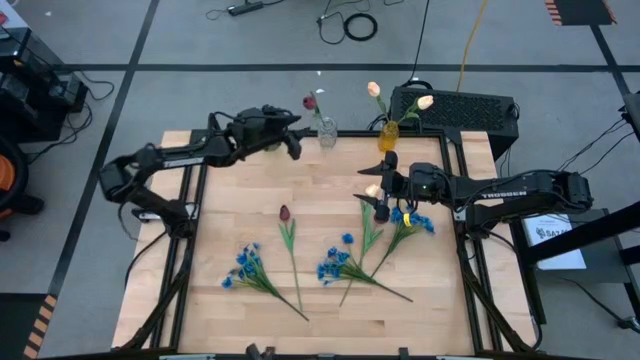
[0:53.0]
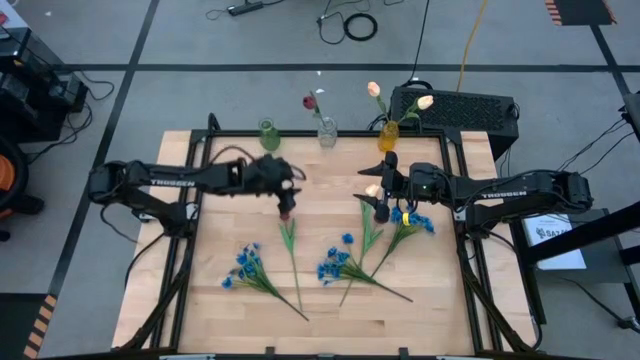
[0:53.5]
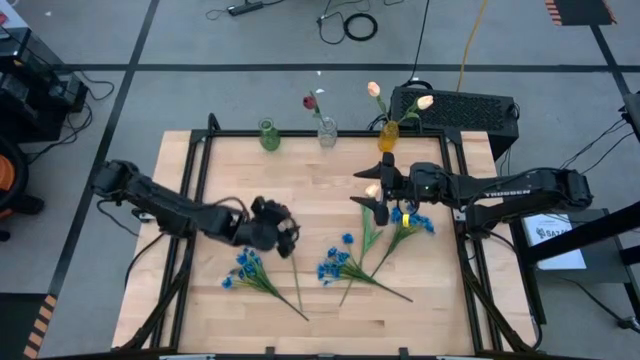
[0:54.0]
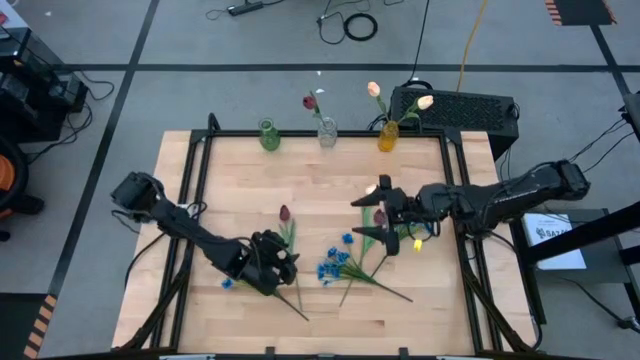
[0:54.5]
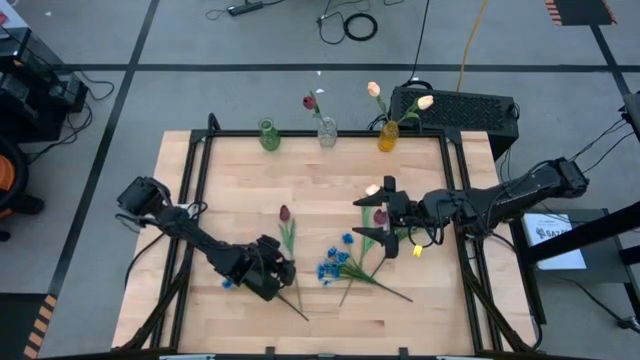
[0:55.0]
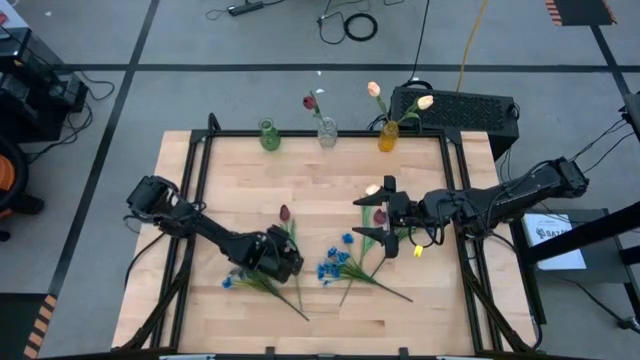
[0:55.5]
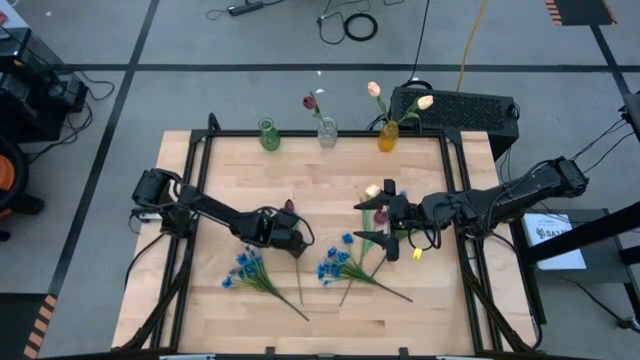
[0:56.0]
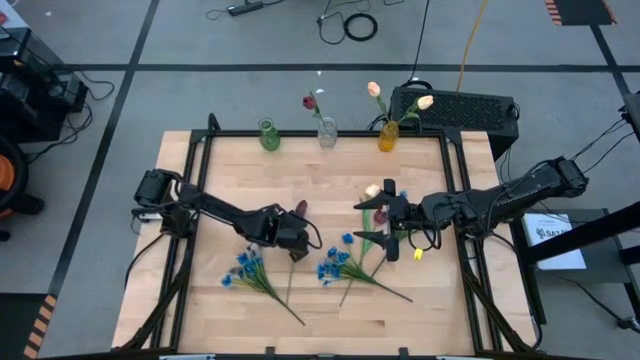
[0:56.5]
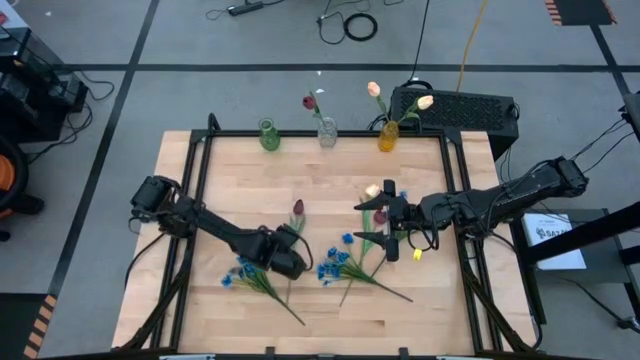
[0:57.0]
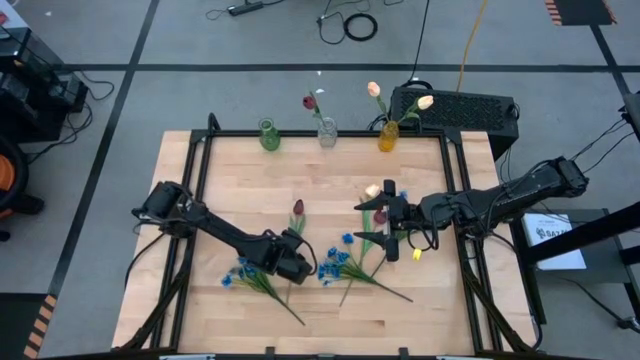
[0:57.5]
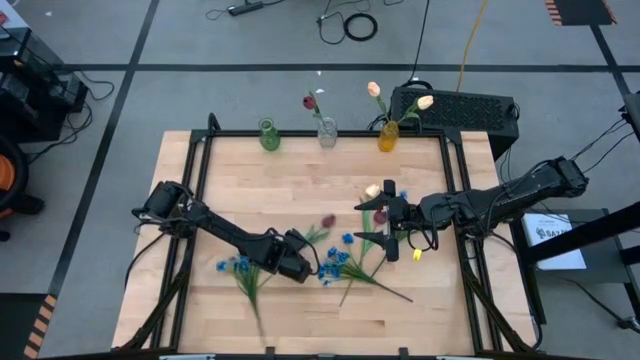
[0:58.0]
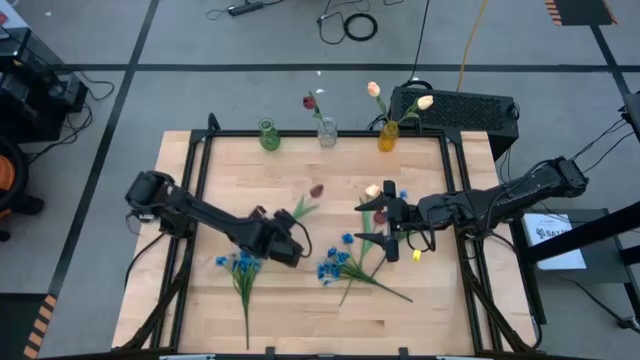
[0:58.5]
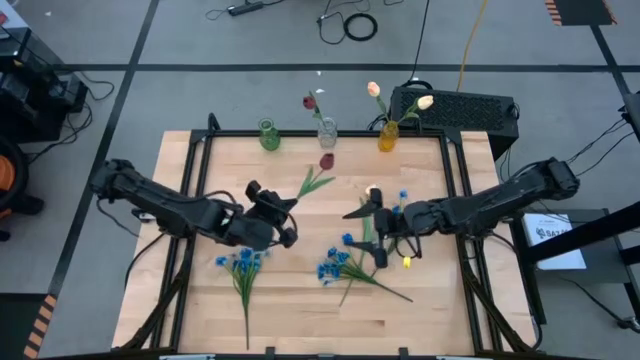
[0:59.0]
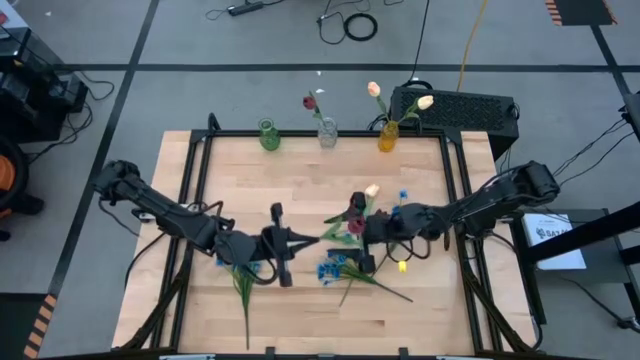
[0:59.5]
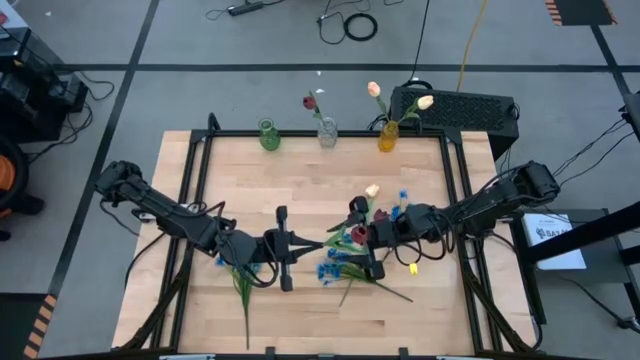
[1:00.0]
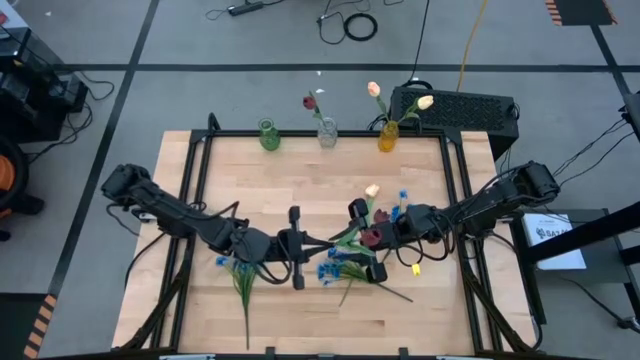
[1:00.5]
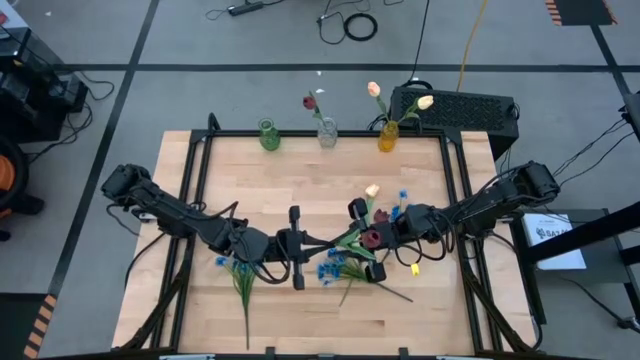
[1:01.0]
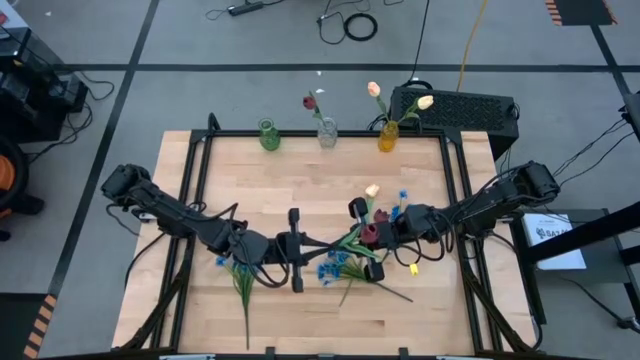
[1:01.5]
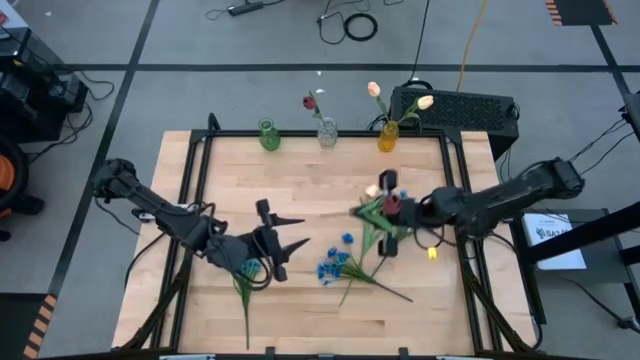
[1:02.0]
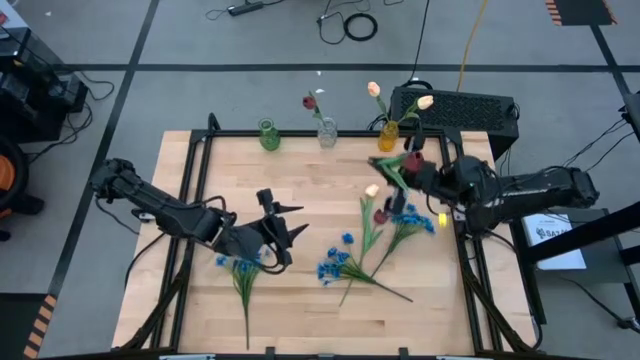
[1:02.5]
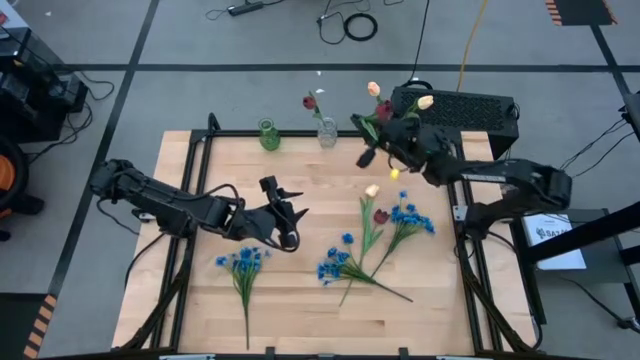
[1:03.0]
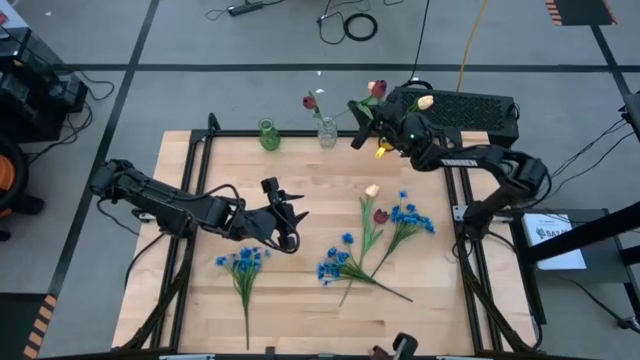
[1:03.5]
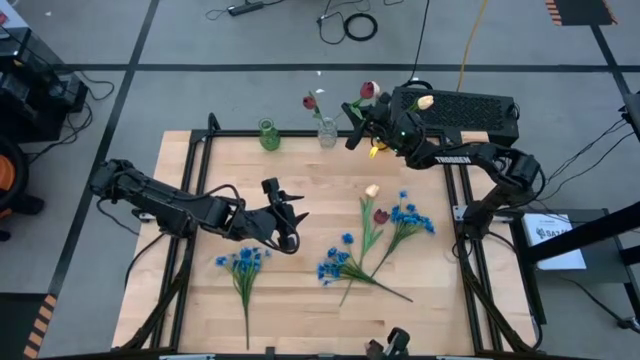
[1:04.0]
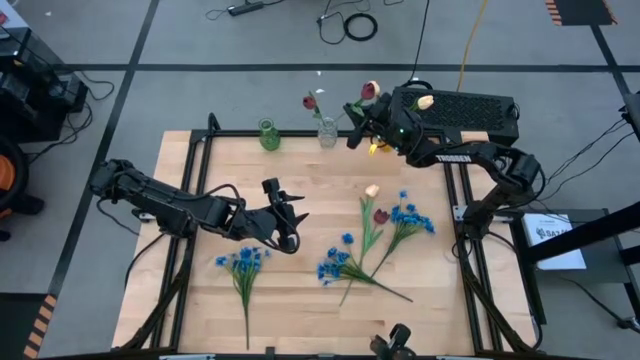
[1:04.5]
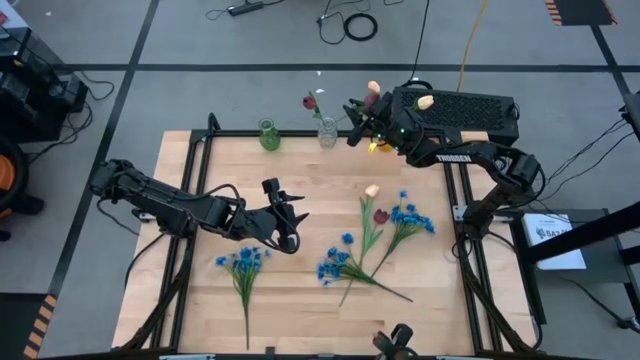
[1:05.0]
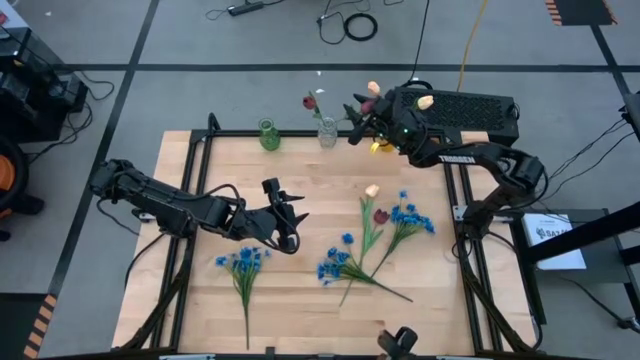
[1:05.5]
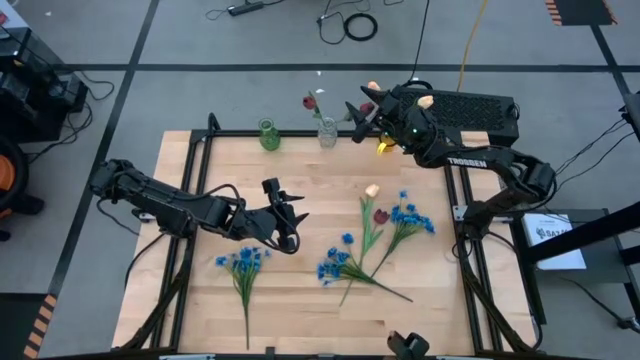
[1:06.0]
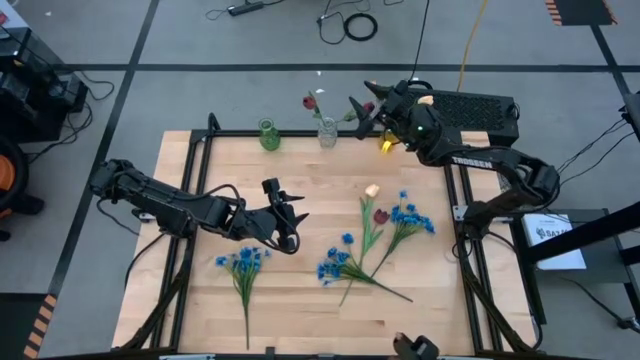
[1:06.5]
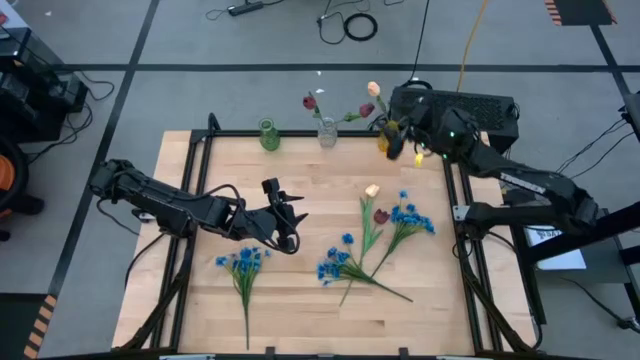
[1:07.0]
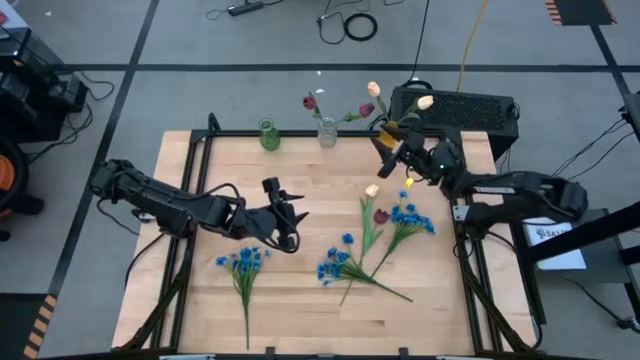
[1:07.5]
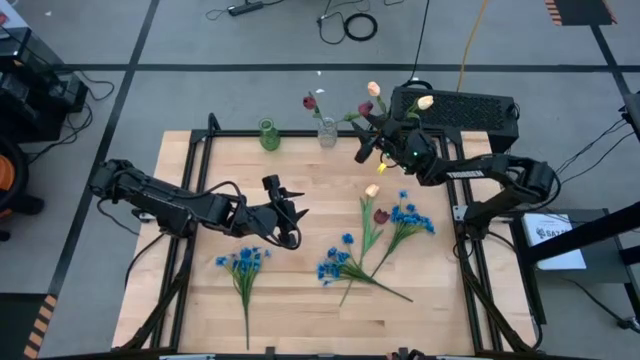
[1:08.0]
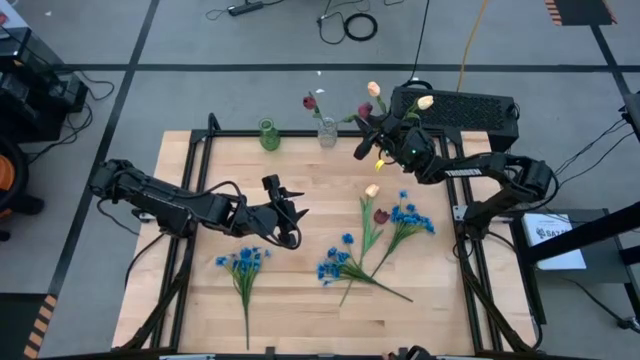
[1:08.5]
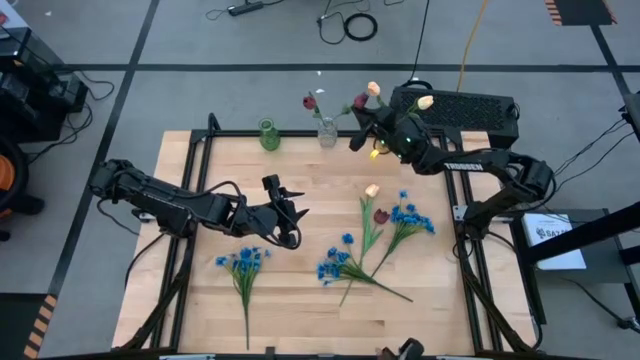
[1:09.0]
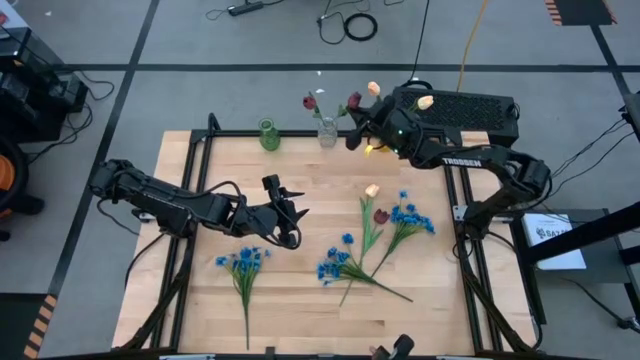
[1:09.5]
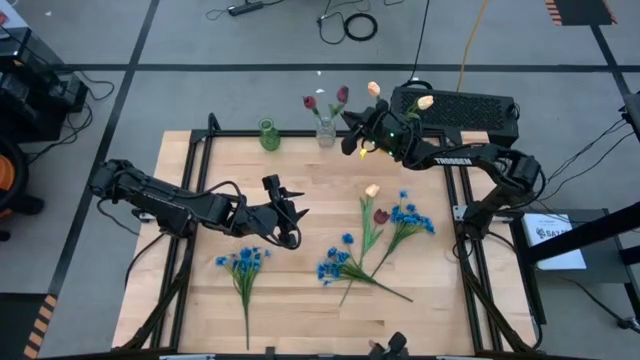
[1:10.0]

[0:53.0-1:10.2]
Task: Sort flowers into vase by color
Put the left red tulip into the transparent vase

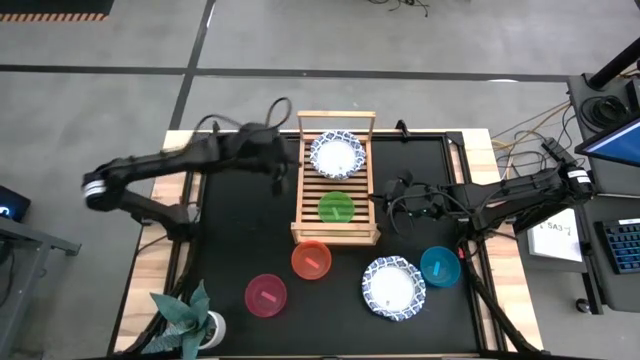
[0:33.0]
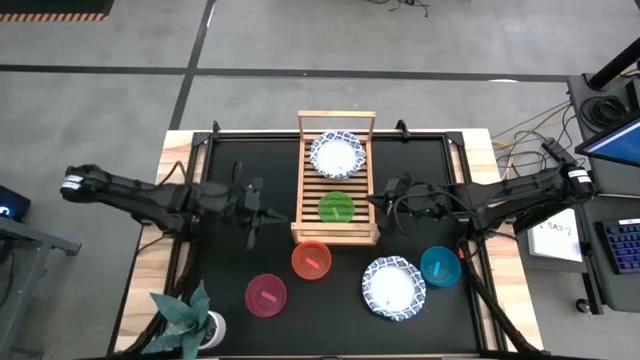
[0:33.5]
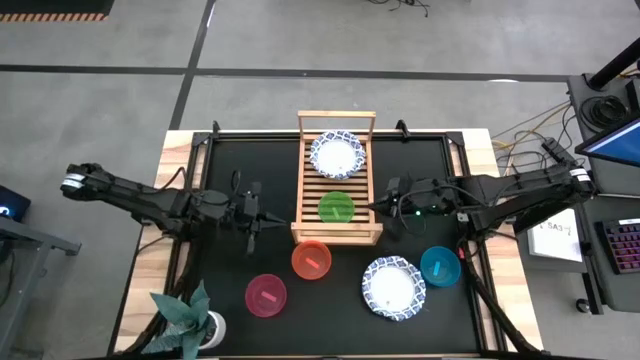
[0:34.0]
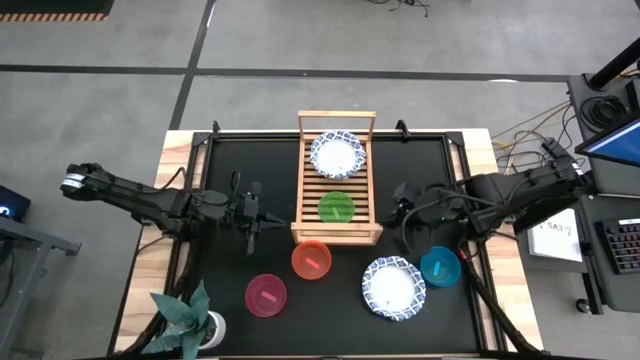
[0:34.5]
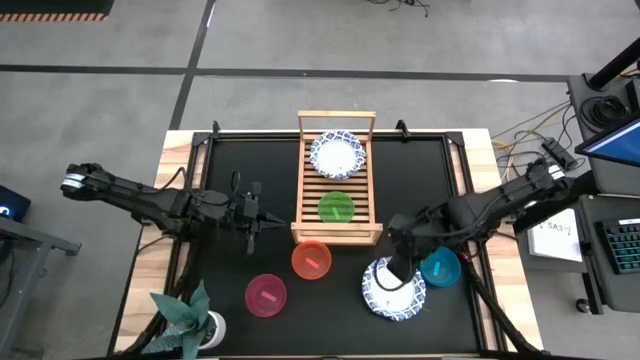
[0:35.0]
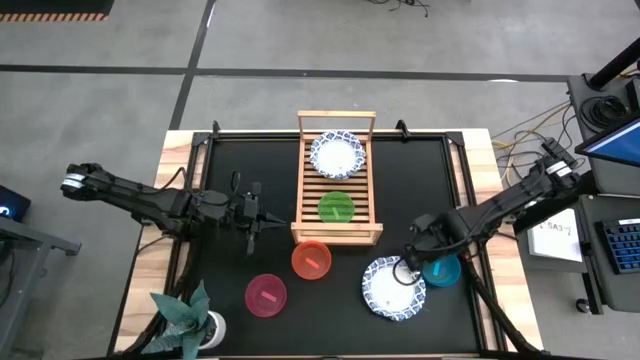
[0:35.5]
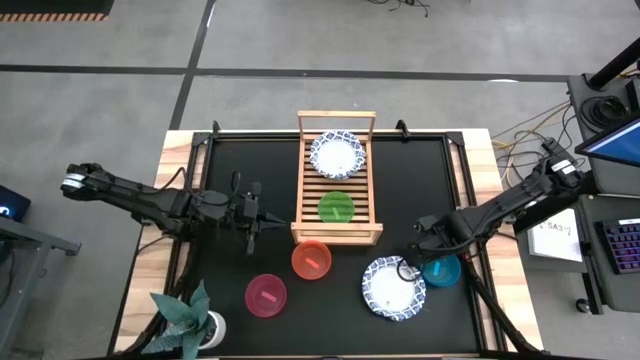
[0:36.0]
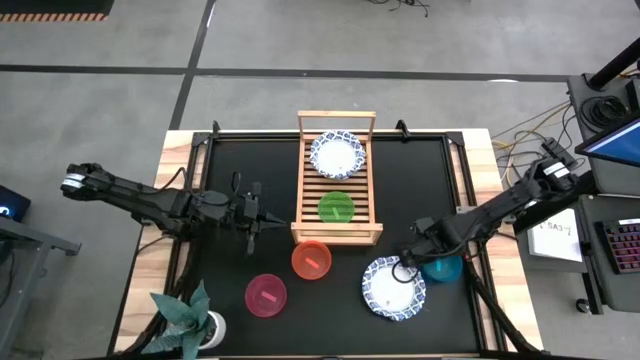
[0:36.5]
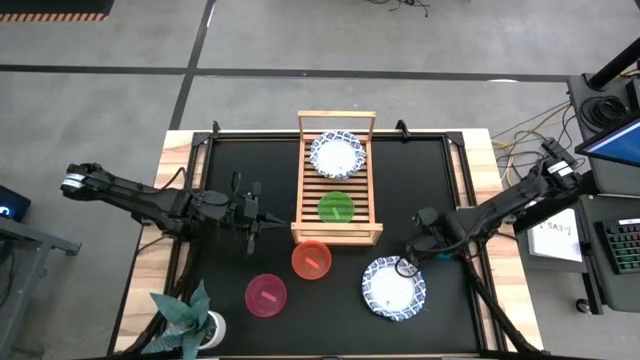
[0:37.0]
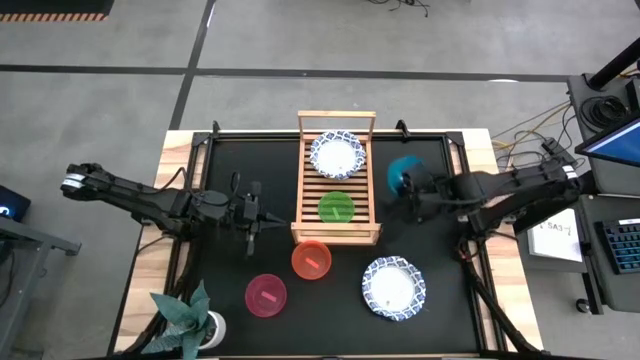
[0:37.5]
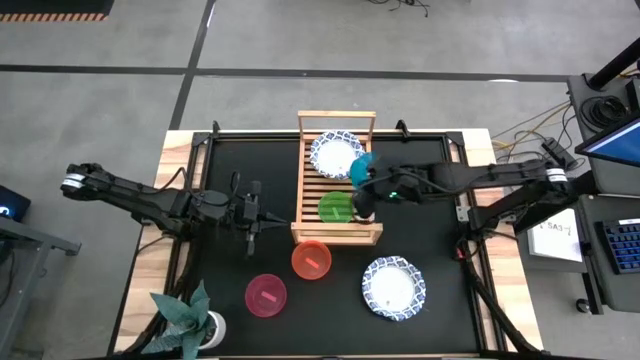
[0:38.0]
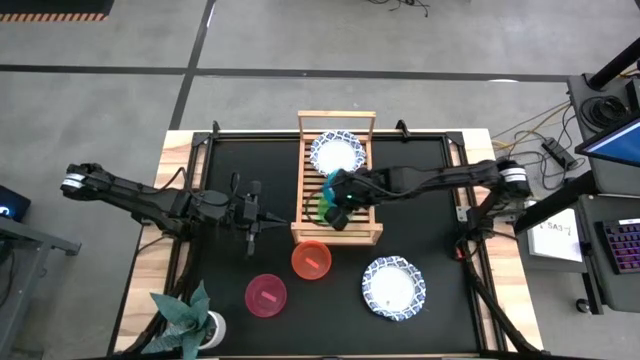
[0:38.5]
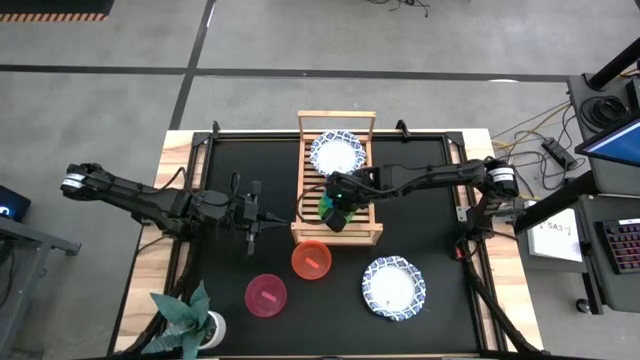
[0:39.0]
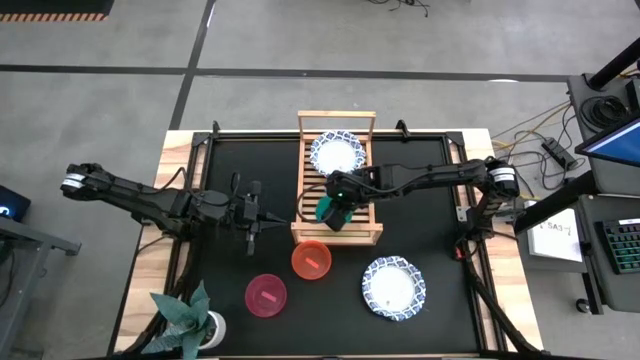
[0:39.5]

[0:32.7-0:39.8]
Task: Place and stack bowls onto a shelf
Stack the blue bowl on top of the green bowl on the shelf
